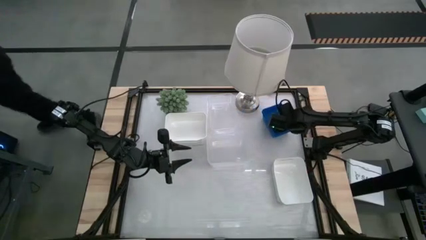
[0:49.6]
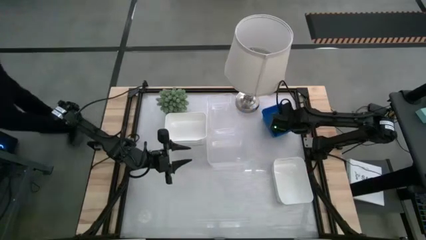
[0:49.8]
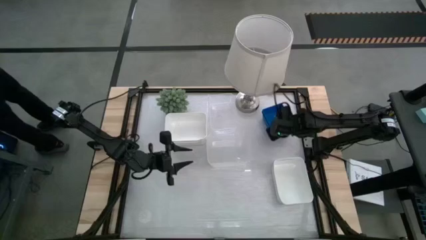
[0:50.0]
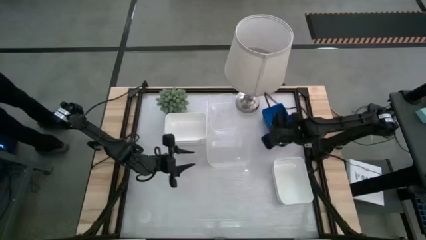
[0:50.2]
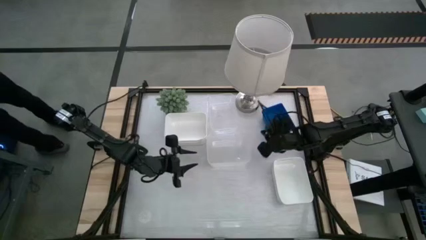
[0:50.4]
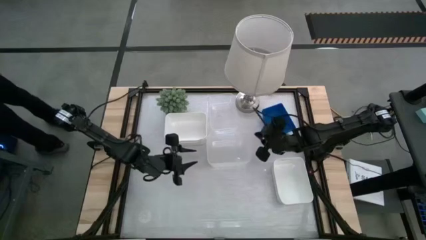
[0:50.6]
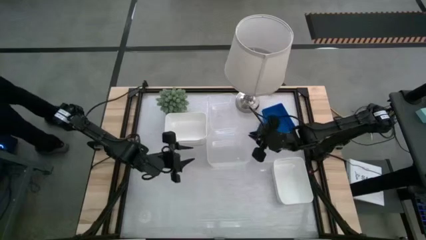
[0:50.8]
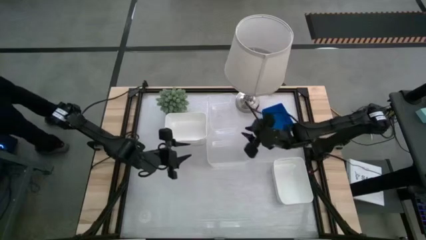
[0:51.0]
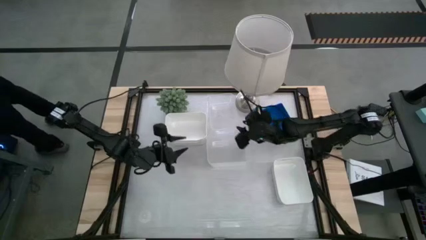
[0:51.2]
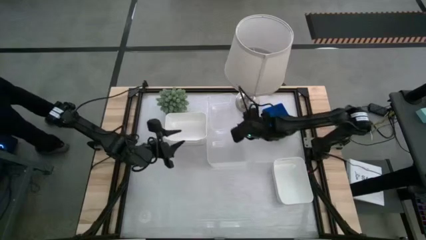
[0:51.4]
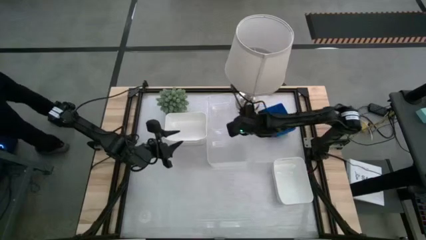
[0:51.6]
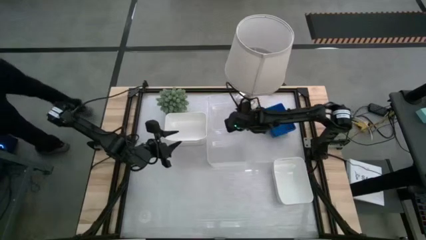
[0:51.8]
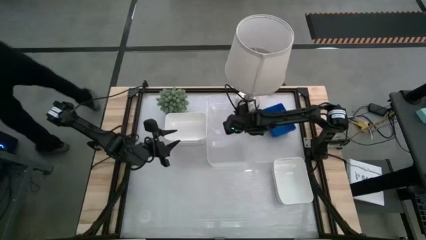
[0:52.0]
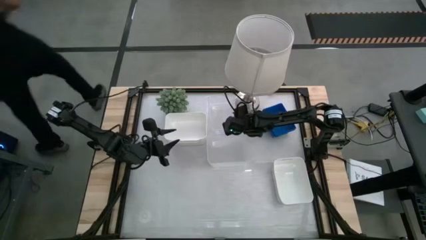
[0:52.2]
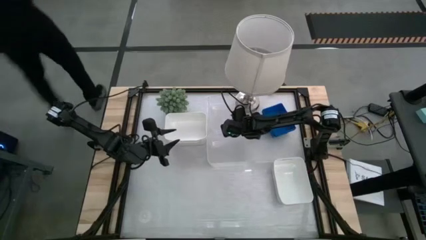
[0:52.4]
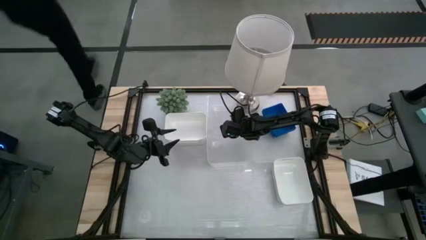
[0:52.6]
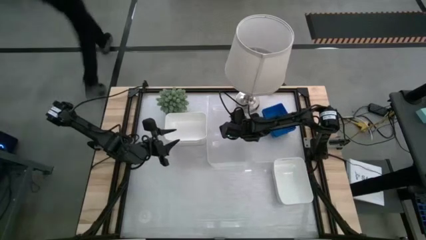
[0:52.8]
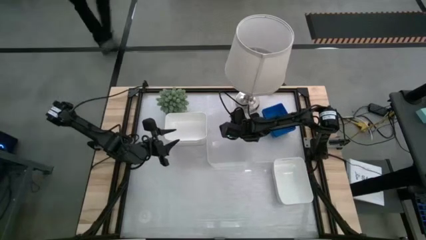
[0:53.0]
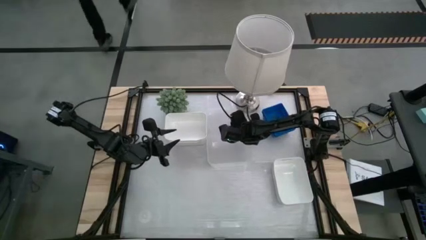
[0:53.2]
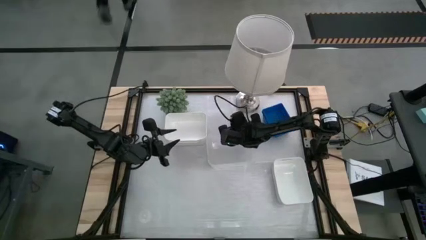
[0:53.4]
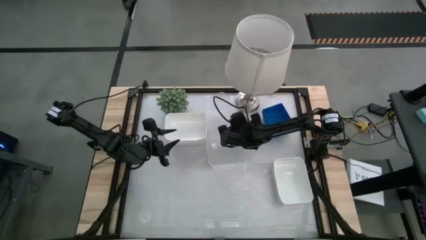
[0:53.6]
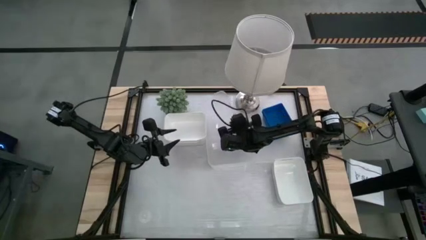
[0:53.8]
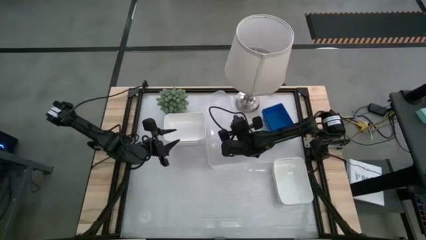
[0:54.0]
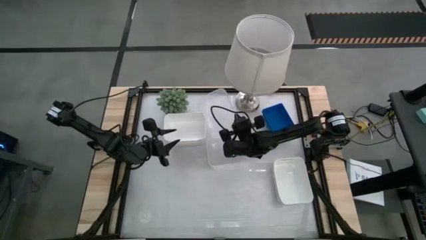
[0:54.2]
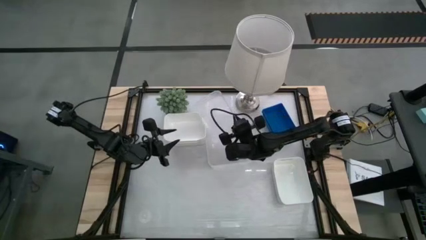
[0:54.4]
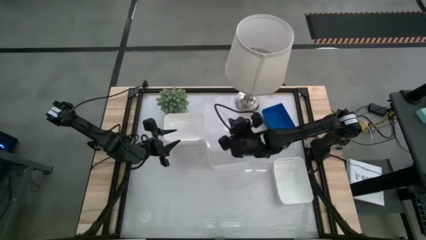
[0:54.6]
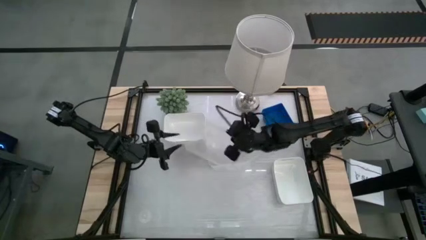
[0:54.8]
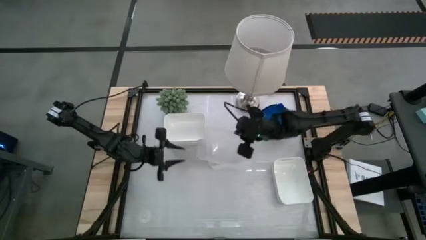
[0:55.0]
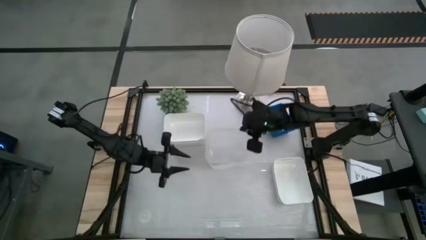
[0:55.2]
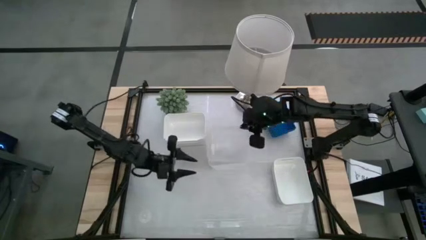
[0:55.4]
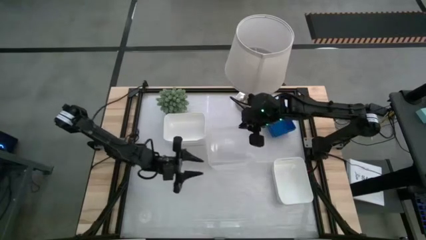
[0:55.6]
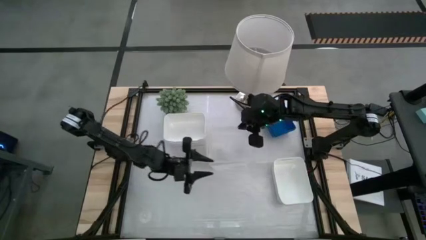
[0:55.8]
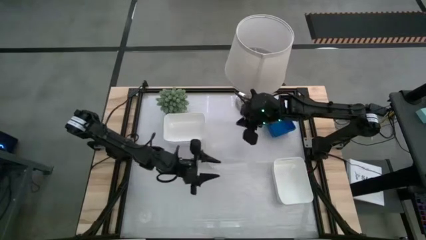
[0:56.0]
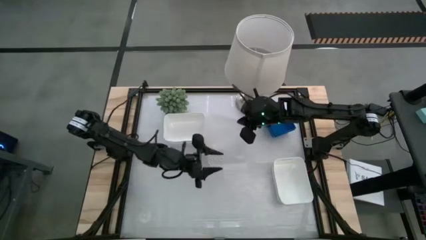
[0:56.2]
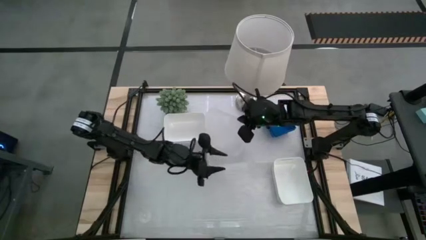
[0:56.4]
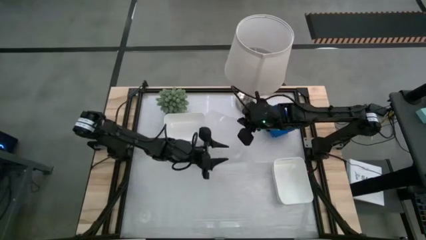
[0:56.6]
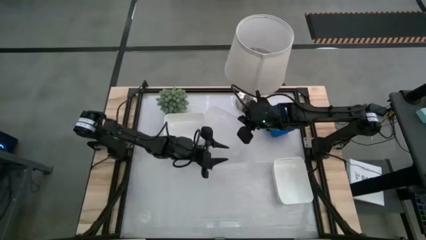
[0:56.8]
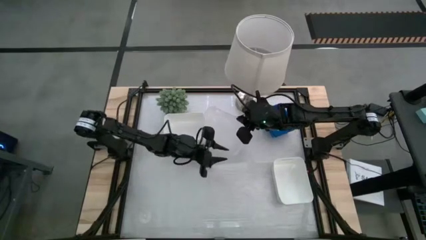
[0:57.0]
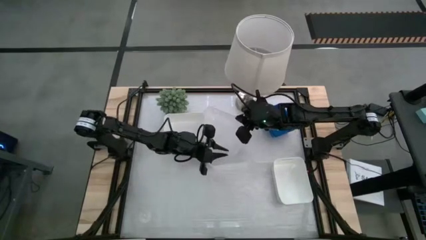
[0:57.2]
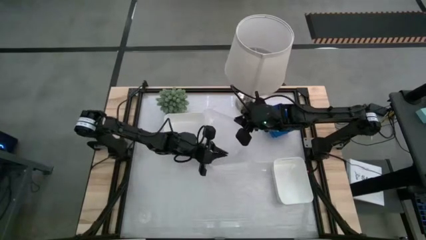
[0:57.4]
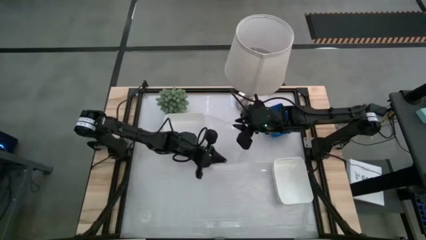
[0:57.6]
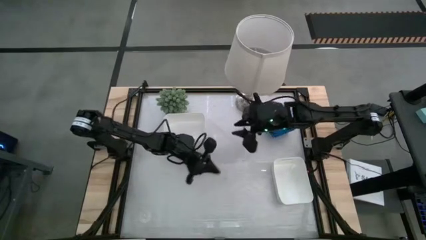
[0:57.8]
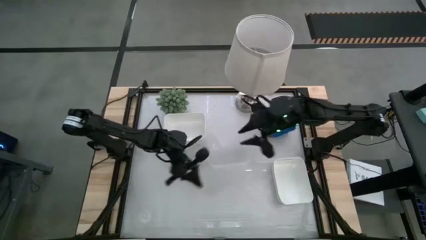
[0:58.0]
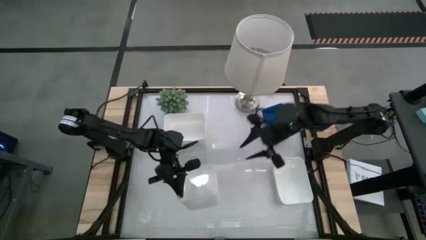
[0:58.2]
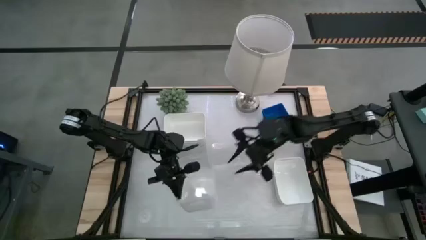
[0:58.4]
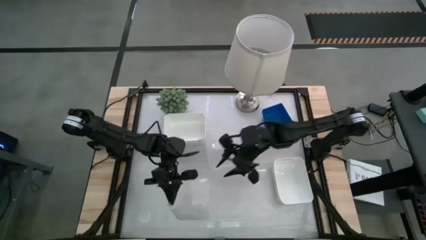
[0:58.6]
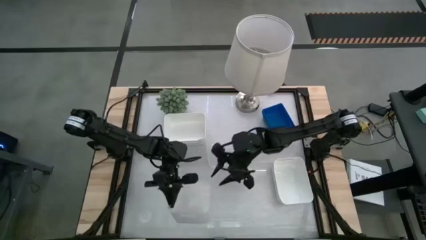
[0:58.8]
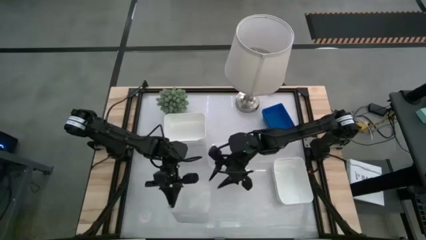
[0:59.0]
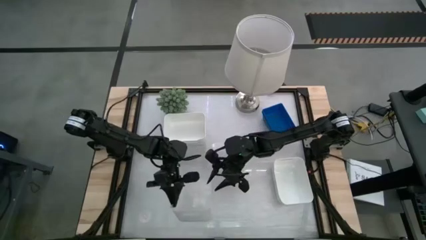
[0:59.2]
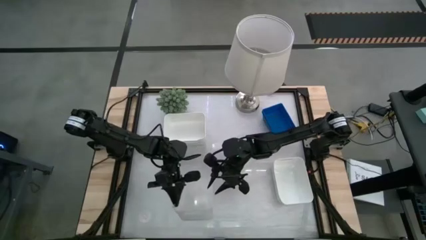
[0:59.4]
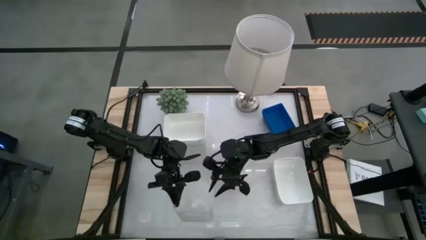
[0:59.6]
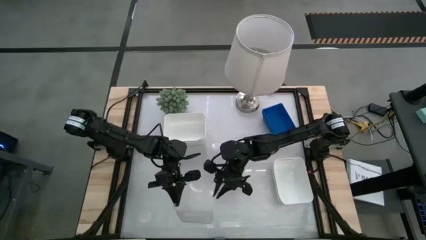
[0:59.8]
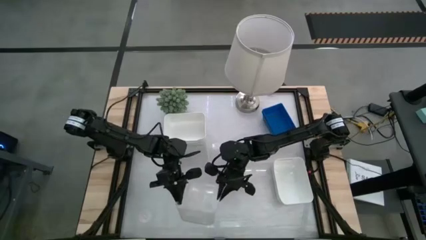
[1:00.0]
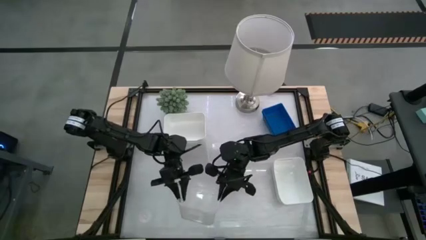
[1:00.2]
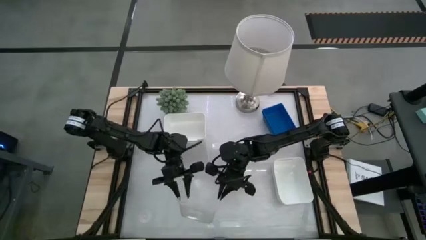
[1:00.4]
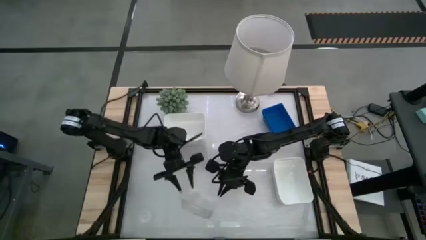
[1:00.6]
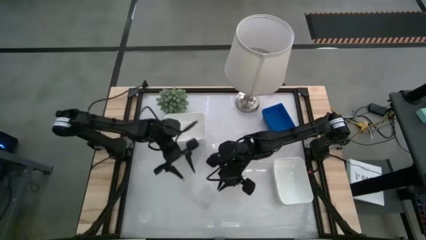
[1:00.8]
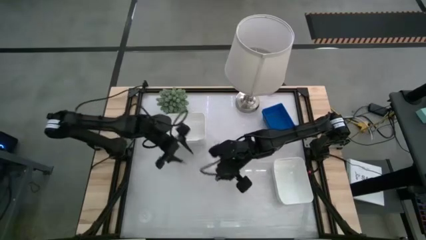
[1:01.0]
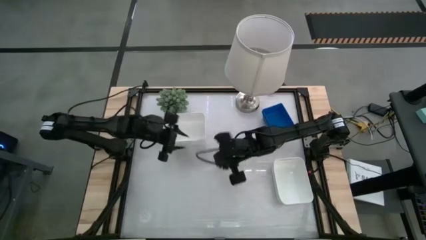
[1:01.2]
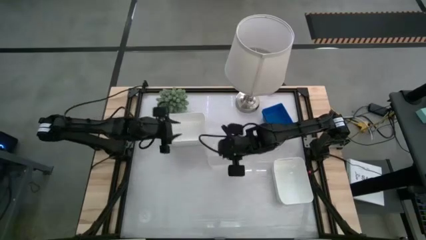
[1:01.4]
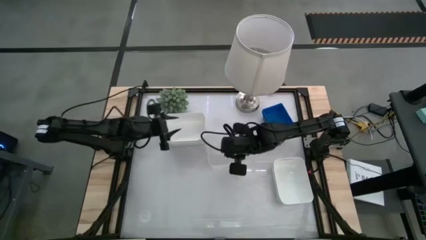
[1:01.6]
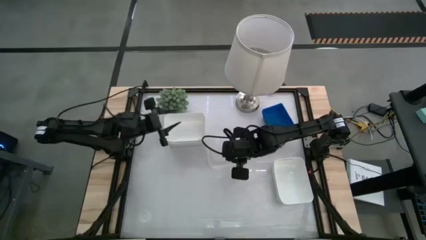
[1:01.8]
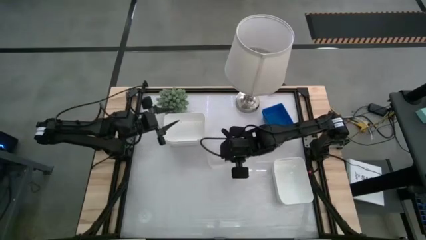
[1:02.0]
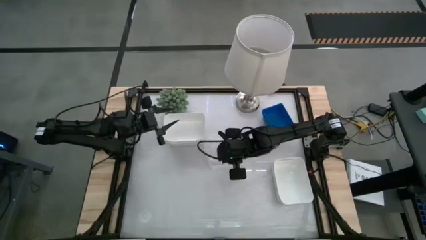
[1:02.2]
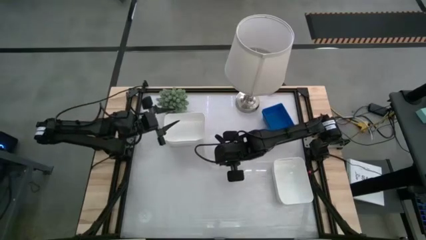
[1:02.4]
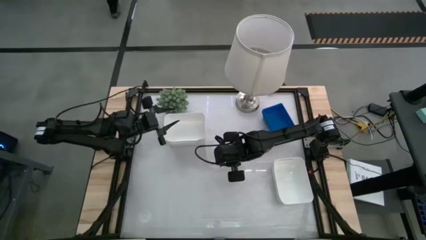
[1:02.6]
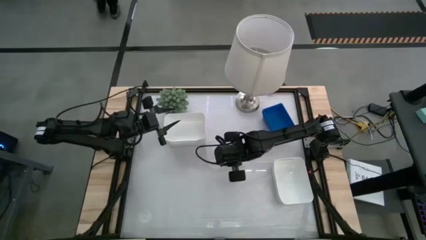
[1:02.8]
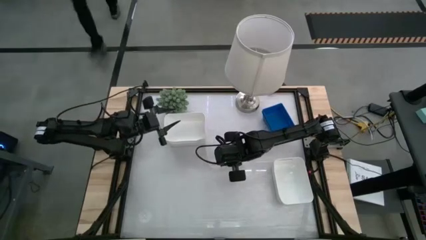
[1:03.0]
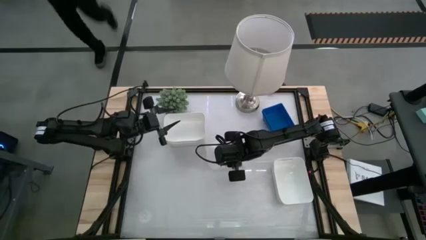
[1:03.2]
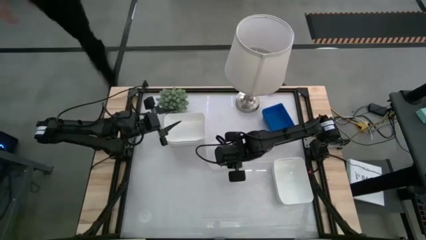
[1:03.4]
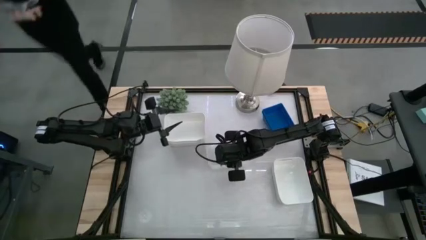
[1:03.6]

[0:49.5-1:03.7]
Stack the top transparent bin on top of the transparent bin

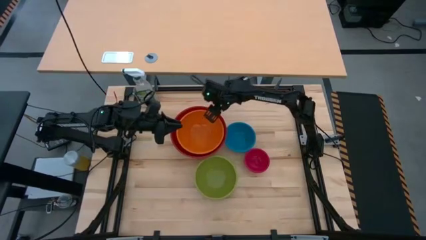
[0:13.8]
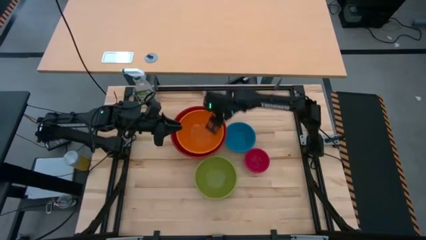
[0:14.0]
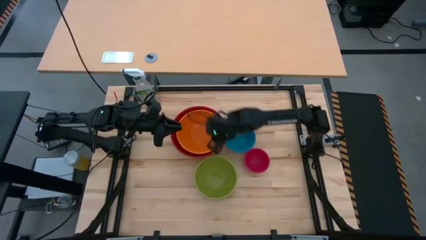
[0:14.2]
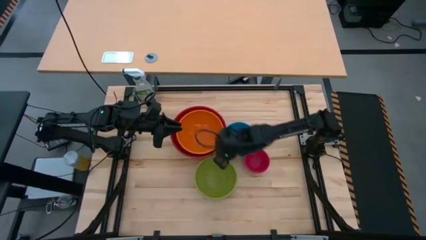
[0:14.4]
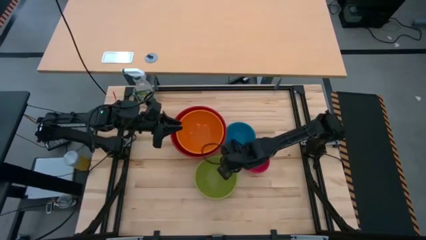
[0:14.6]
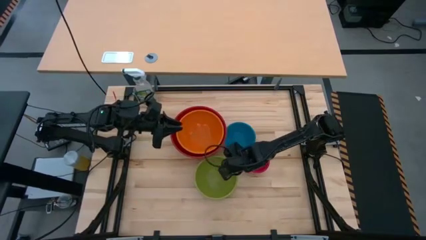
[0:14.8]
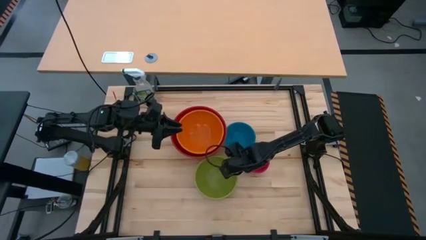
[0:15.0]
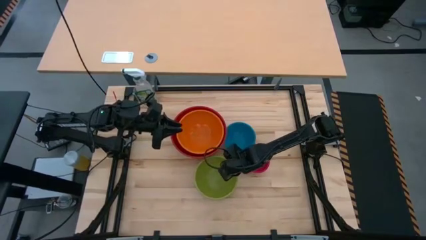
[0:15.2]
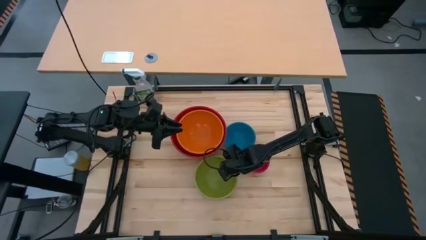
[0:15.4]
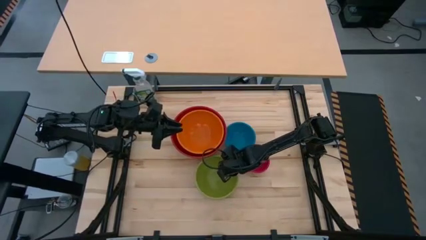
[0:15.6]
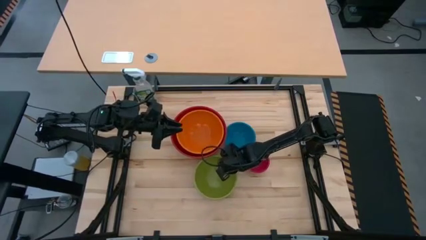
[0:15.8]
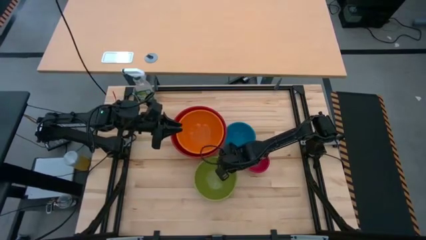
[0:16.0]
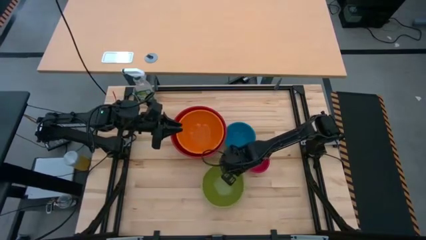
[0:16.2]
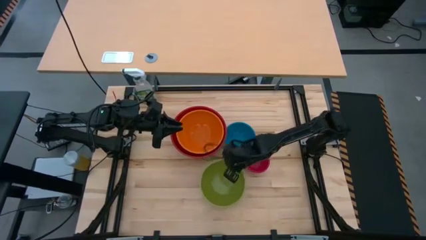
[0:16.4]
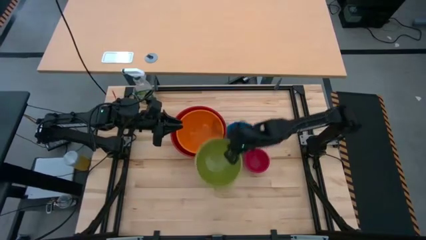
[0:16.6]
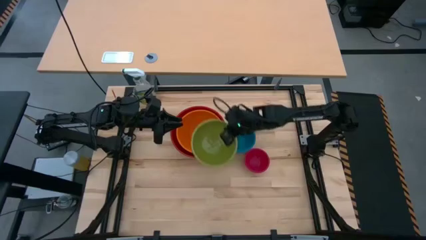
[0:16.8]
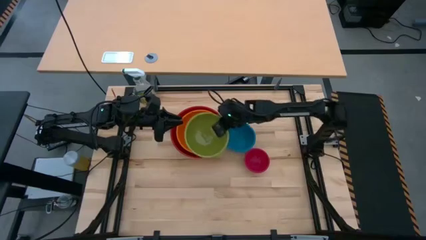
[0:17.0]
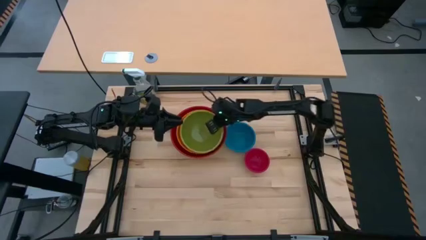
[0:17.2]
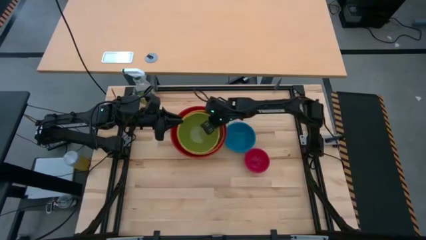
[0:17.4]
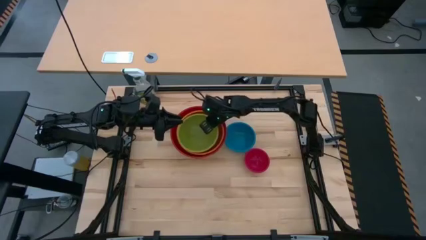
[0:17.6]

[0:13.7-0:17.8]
Stack the green bowl on the orange bowl
